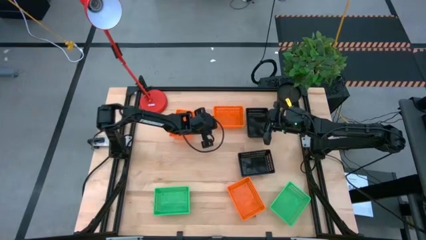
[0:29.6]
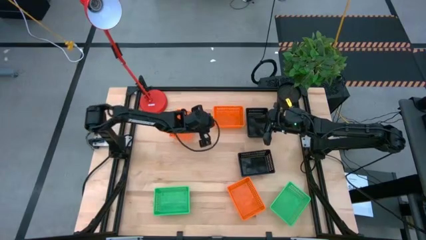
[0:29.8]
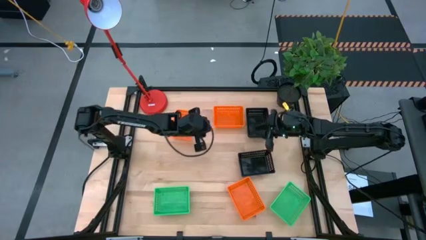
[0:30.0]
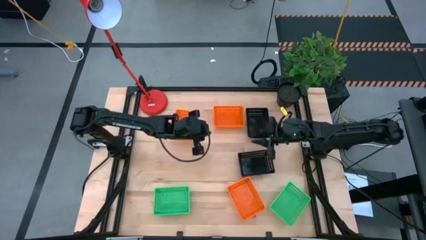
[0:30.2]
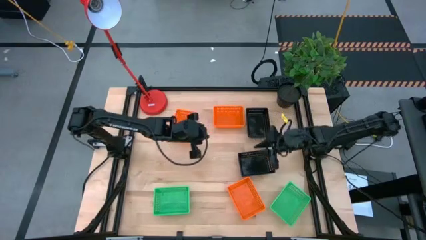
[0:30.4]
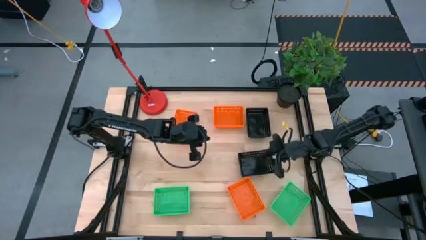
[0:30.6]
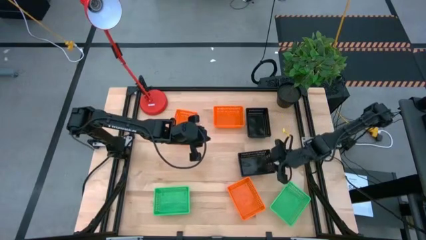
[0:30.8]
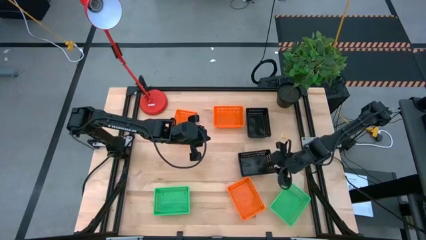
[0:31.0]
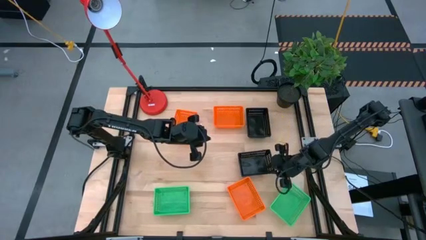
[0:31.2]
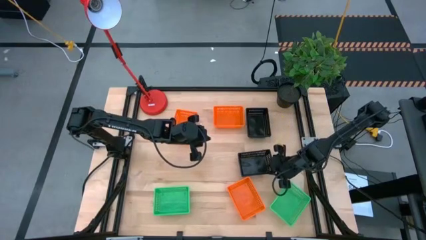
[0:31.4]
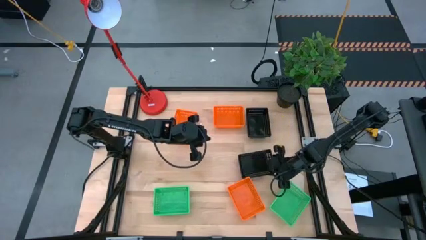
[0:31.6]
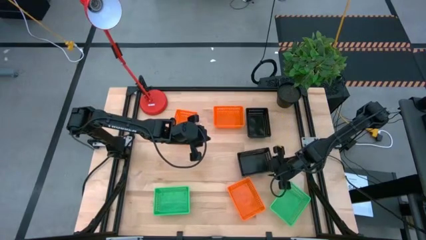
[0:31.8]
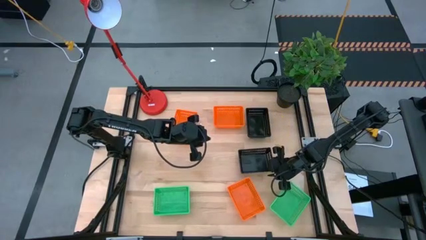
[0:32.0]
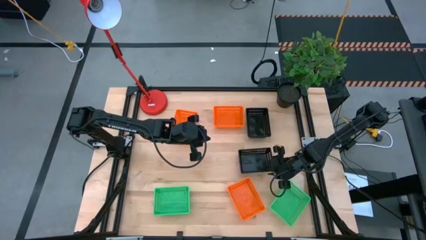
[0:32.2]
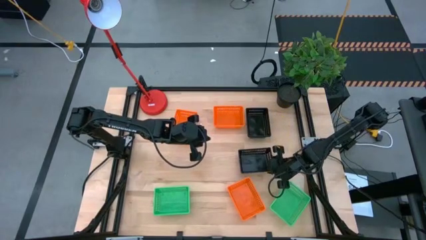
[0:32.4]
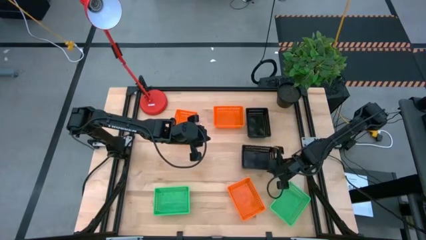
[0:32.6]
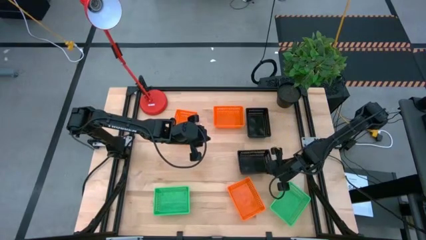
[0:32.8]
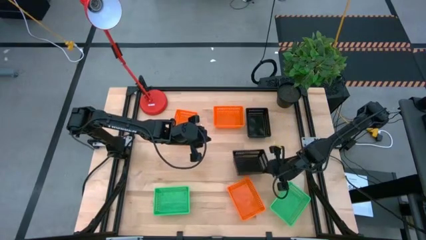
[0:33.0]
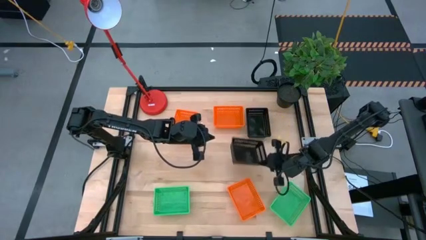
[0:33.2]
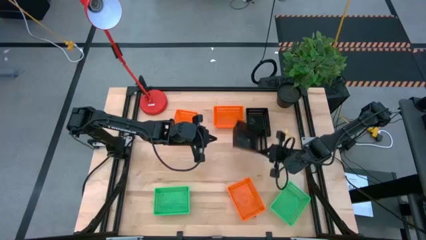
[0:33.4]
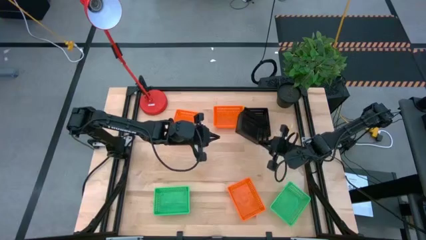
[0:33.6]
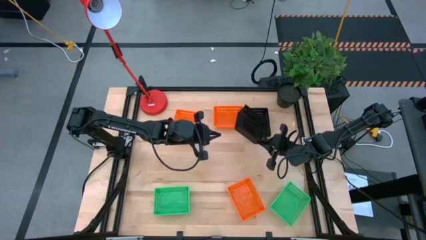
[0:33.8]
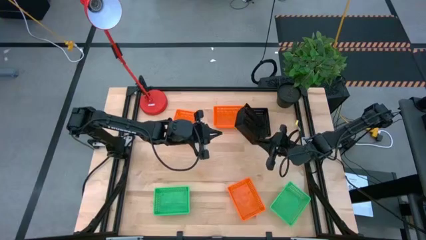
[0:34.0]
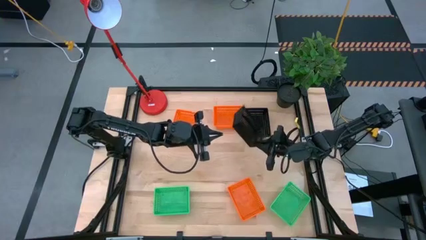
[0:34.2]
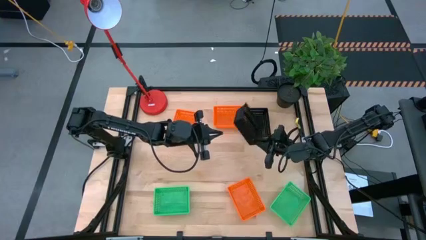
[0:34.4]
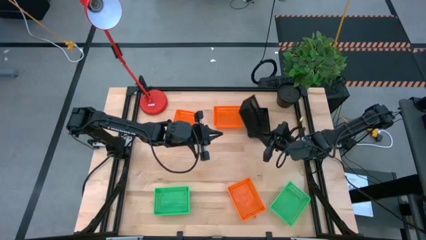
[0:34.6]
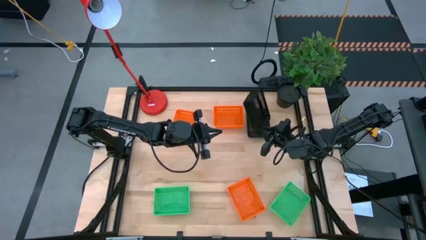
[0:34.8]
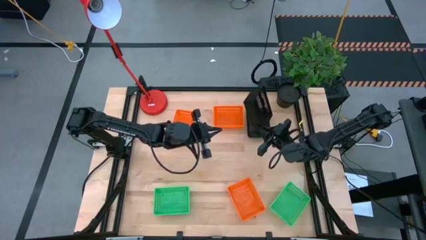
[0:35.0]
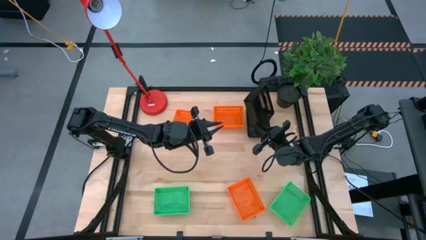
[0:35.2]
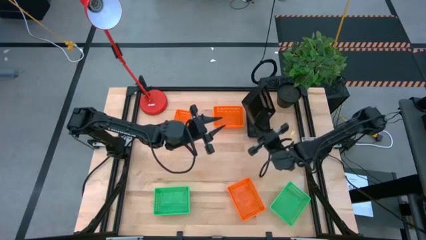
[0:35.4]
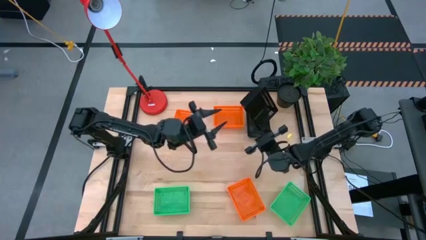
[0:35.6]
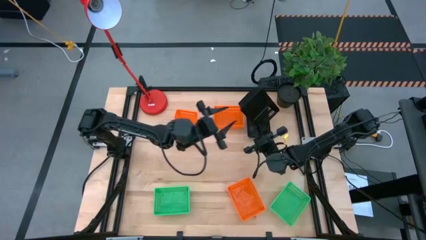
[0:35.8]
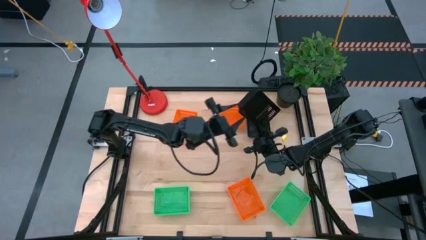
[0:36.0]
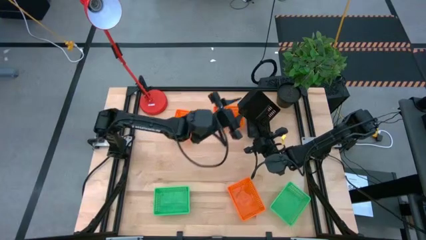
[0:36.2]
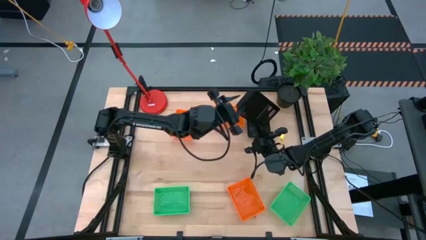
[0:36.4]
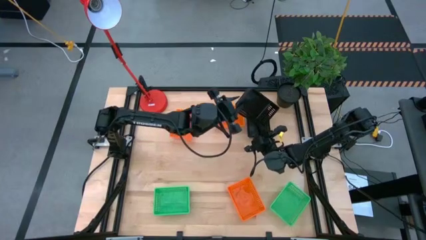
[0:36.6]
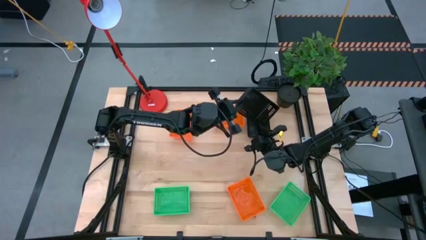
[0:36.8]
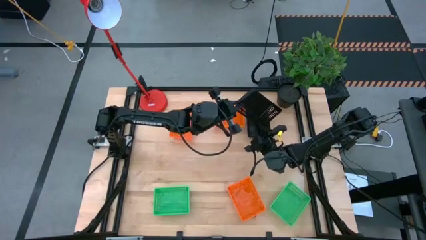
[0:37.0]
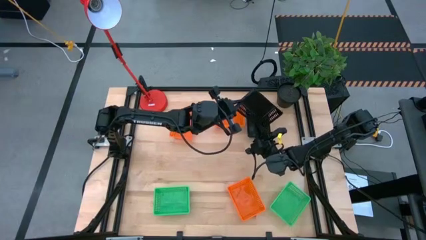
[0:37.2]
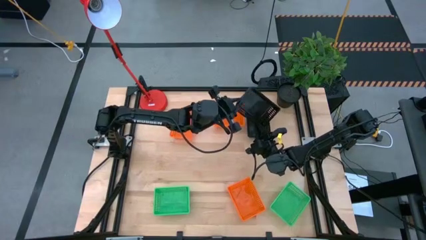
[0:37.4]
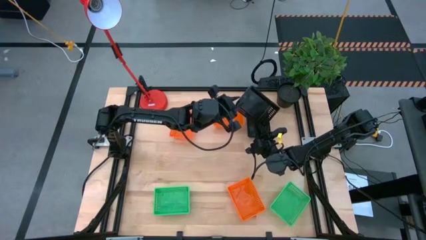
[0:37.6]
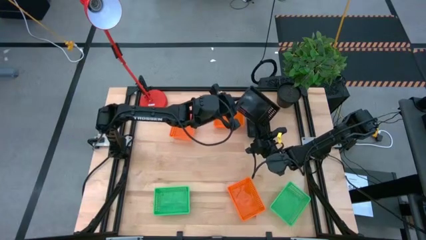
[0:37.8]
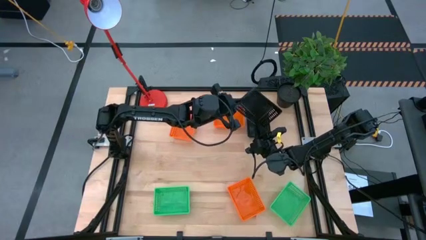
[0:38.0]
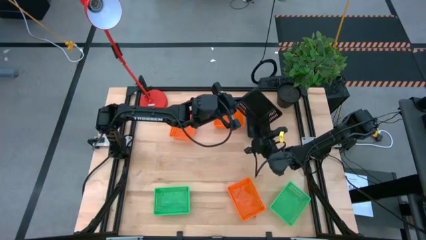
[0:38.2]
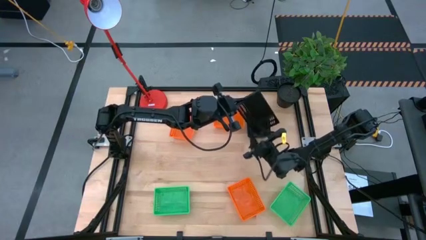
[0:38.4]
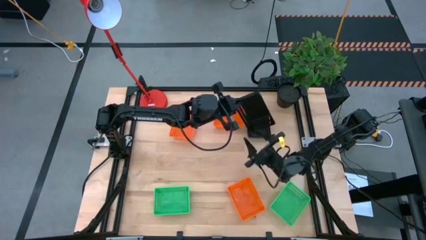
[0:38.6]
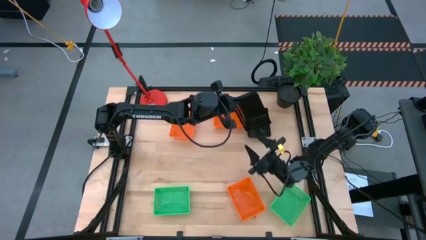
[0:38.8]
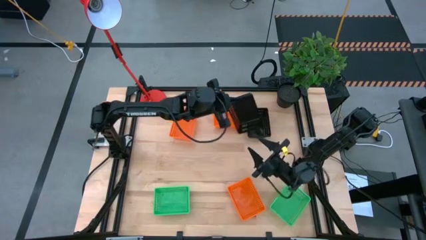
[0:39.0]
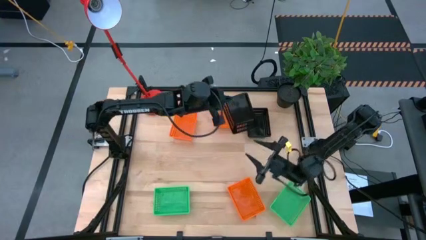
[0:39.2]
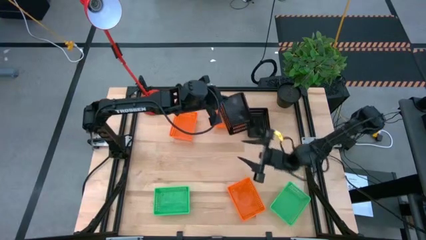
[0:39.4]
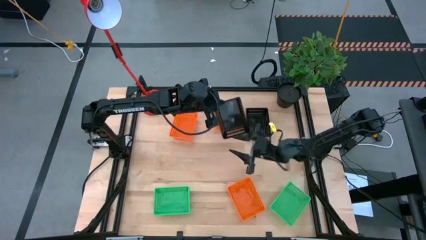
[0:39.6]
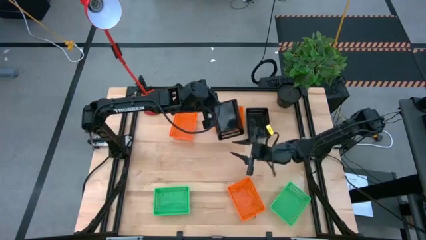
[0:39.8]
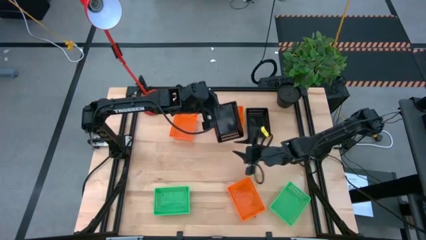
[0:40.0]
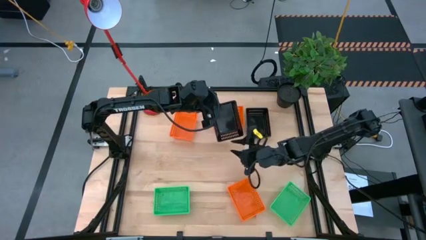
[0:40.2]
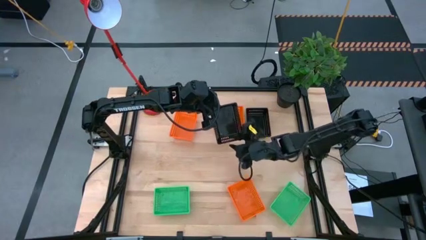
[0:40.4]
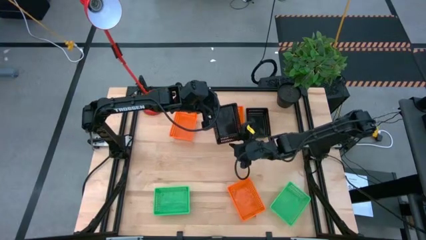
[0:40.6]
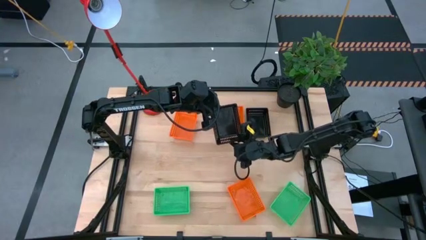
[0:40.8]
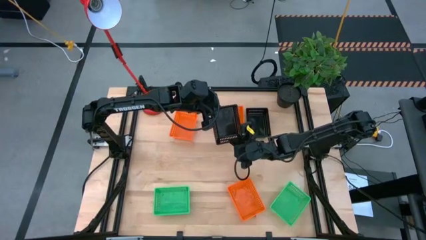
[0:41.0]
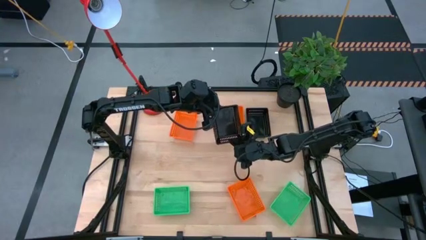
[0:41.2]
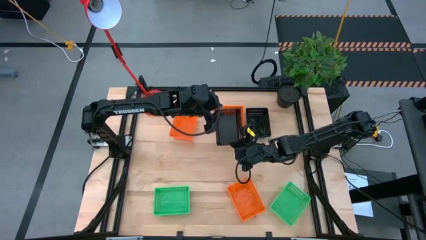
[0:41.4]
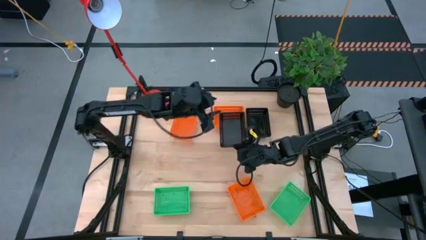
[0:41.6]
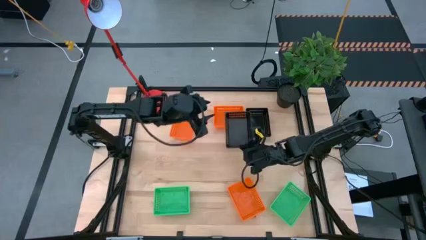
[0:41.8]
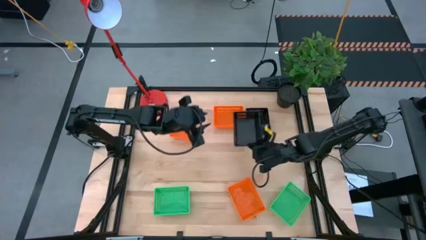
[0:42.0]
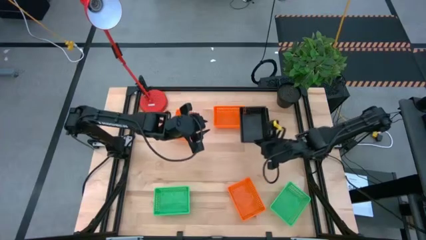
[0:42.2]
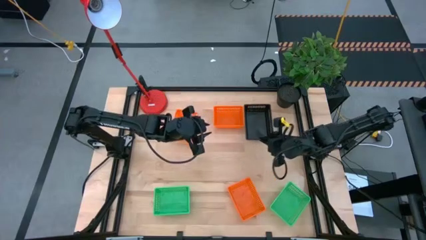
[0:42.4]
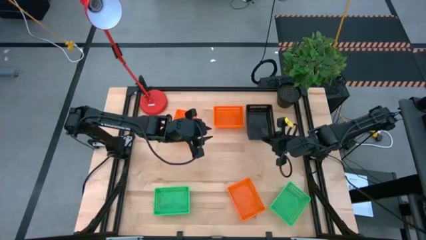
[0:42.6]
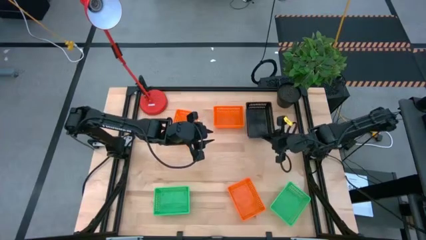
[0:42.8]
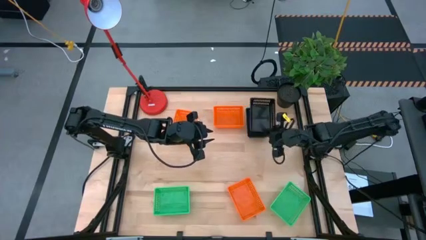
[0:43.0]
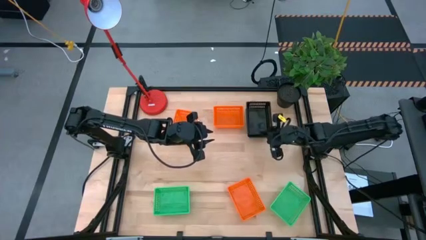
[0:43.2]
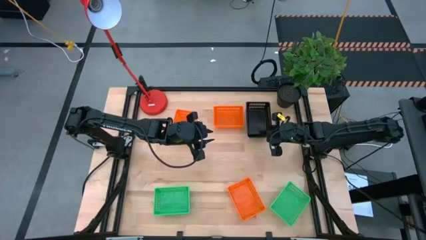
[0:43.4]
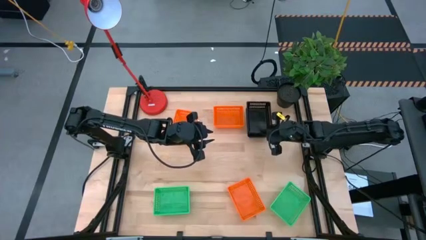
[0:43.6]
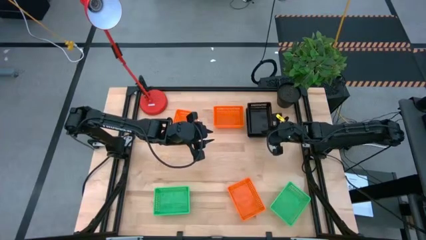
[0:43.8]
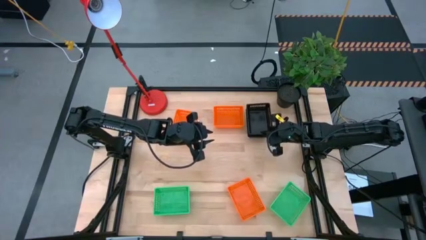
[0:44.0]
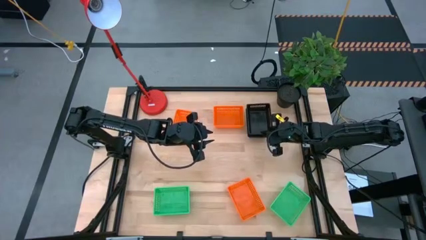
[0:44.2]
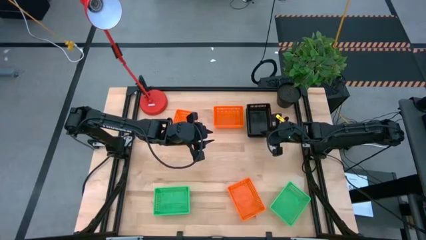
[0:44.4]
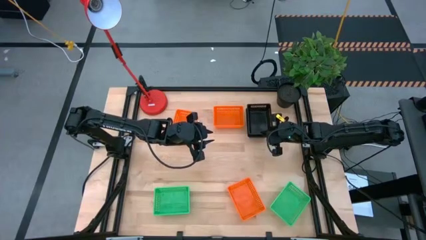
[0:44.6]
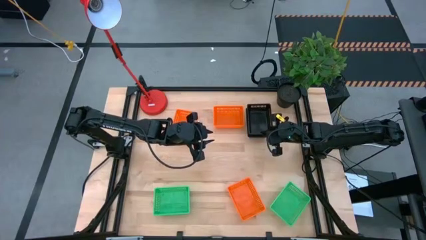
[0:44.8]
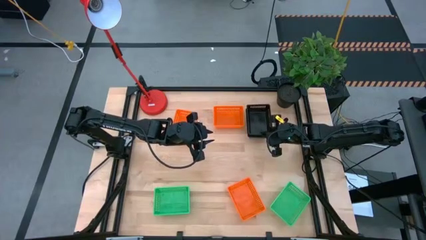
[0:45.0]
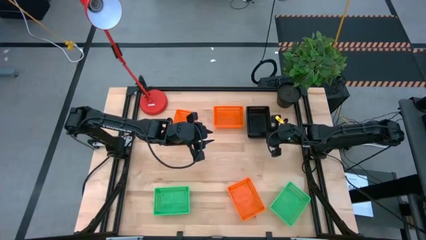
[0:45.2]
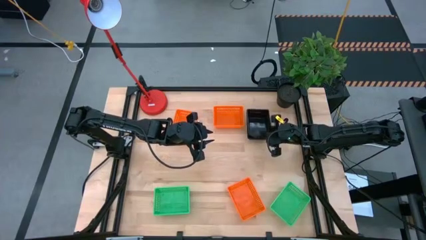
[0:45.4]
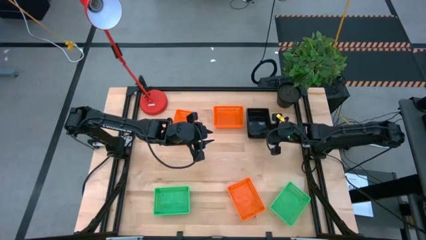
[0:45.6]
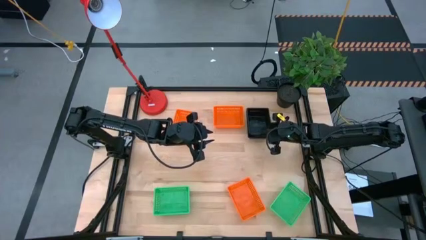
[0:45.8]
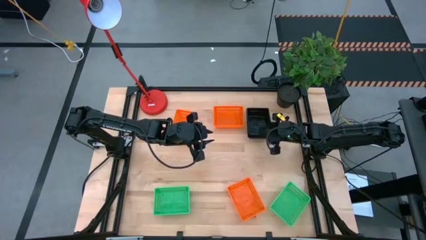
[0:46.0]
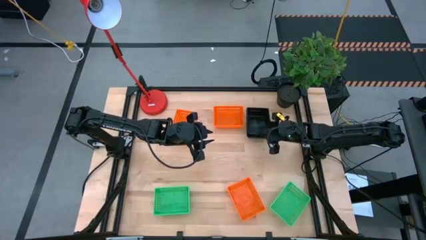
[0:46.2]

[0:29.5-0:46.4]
Stack the black basket on top of the black basket
